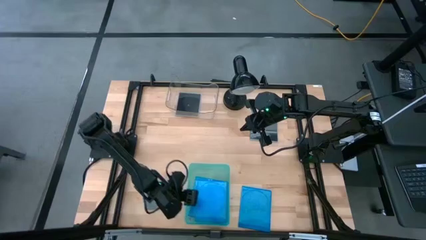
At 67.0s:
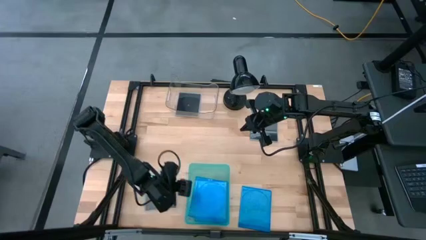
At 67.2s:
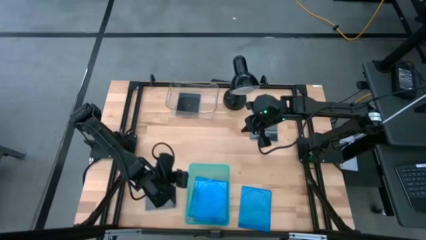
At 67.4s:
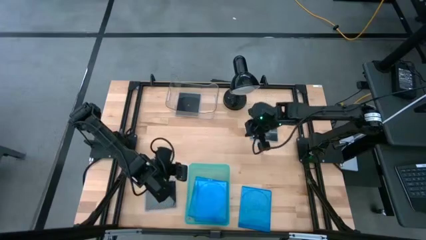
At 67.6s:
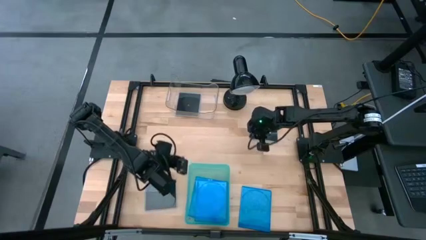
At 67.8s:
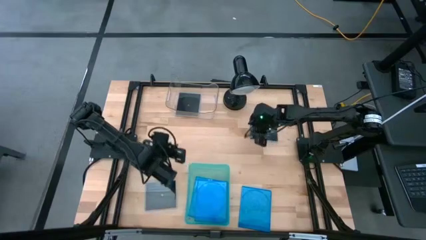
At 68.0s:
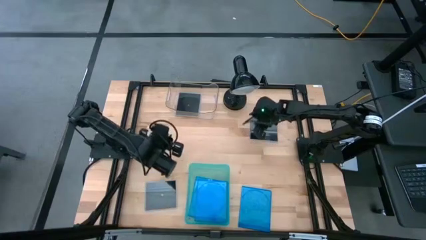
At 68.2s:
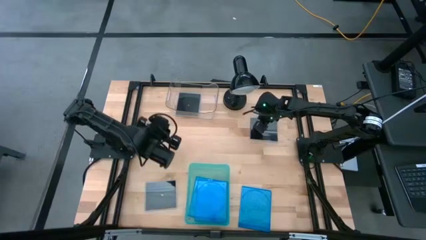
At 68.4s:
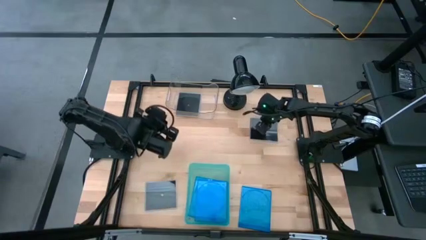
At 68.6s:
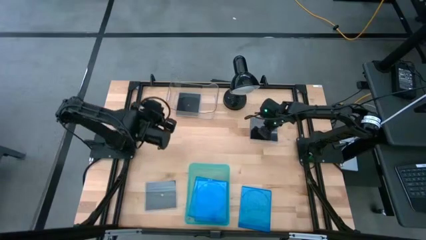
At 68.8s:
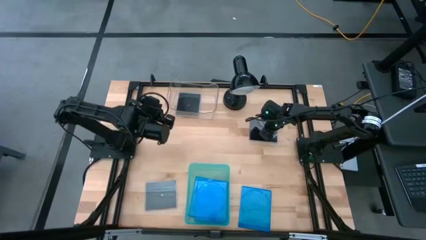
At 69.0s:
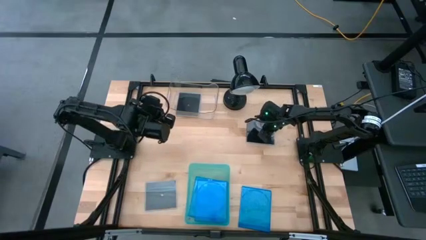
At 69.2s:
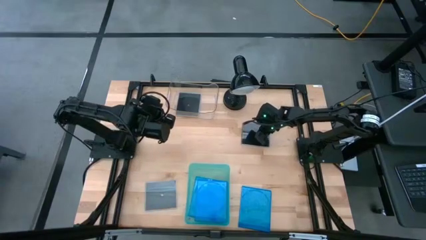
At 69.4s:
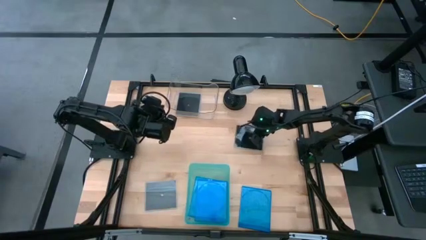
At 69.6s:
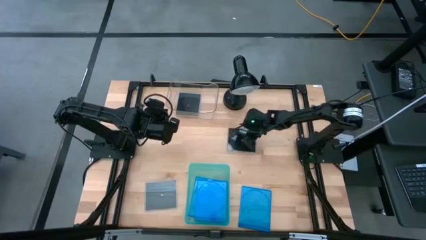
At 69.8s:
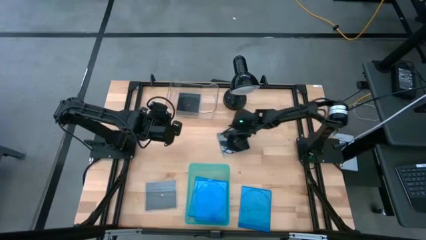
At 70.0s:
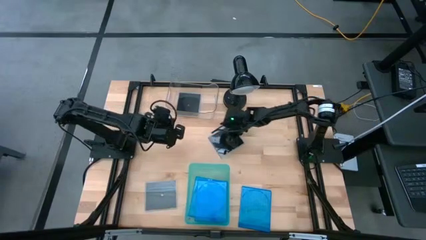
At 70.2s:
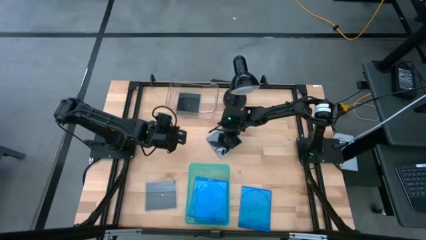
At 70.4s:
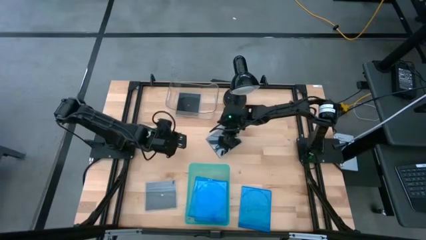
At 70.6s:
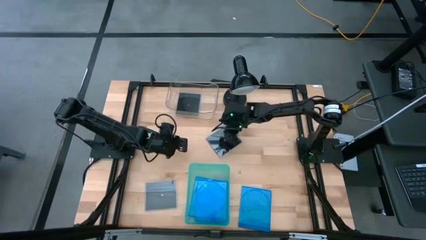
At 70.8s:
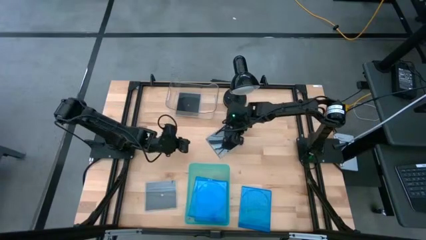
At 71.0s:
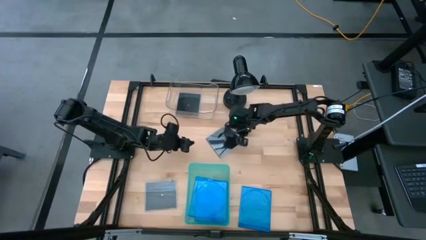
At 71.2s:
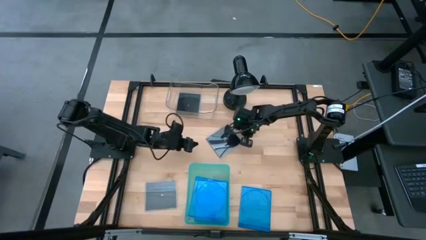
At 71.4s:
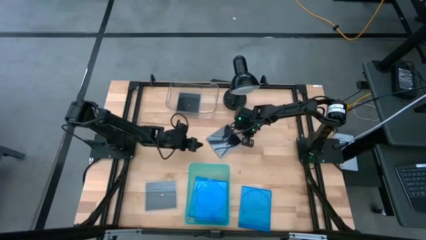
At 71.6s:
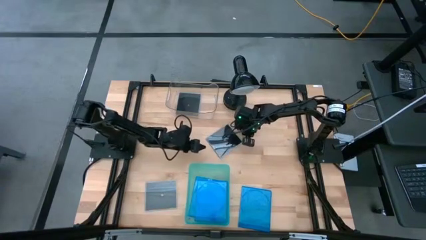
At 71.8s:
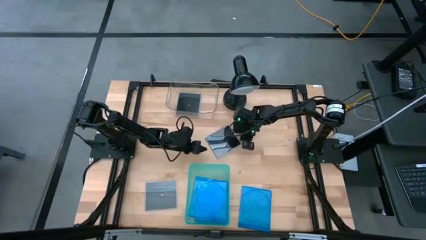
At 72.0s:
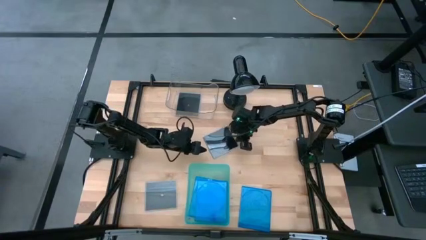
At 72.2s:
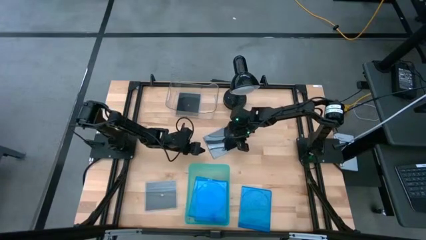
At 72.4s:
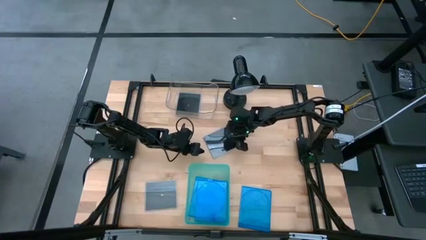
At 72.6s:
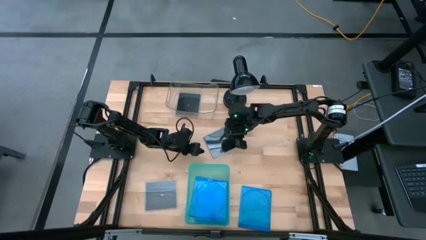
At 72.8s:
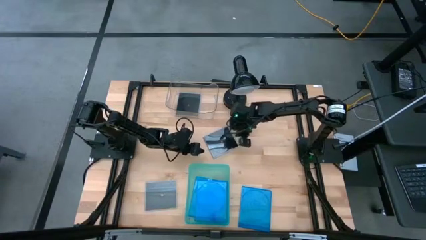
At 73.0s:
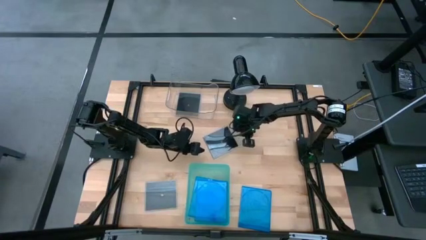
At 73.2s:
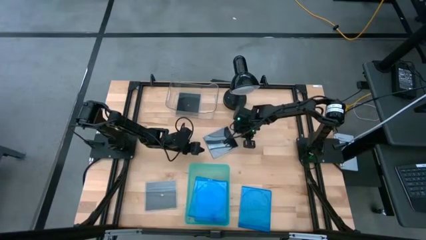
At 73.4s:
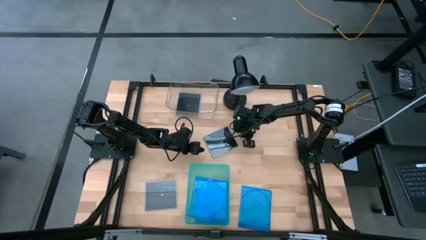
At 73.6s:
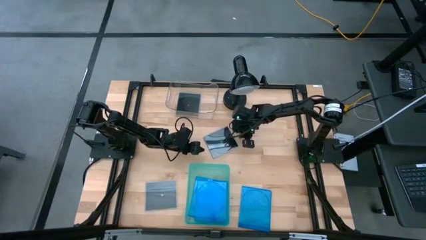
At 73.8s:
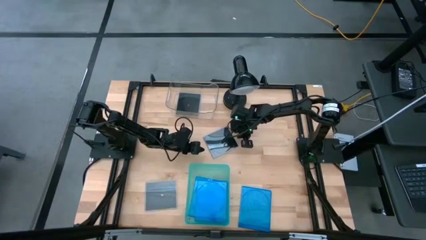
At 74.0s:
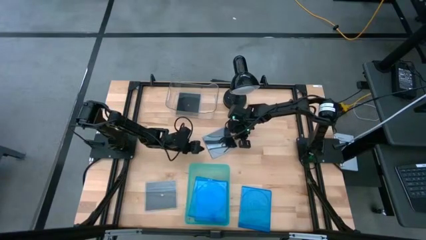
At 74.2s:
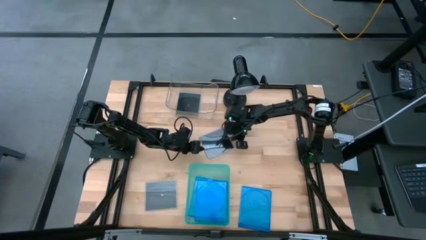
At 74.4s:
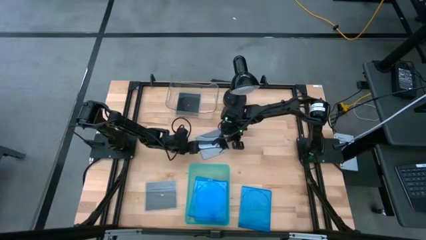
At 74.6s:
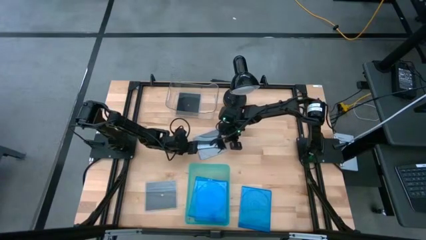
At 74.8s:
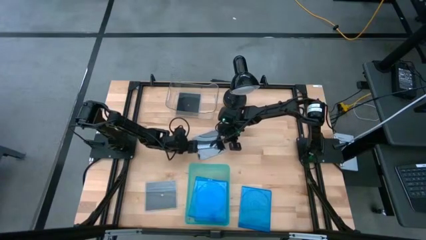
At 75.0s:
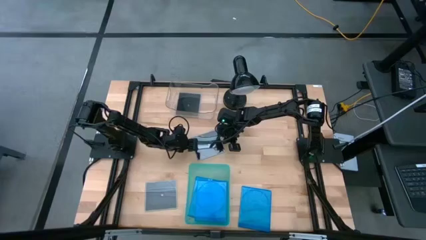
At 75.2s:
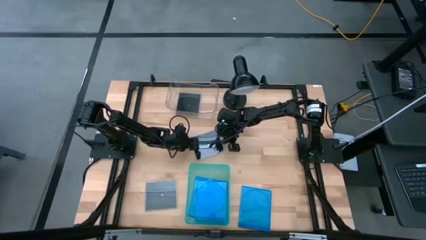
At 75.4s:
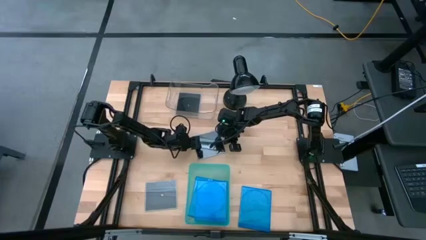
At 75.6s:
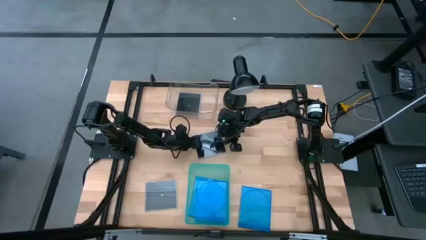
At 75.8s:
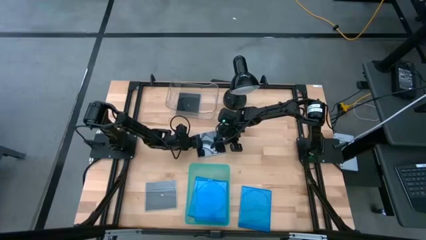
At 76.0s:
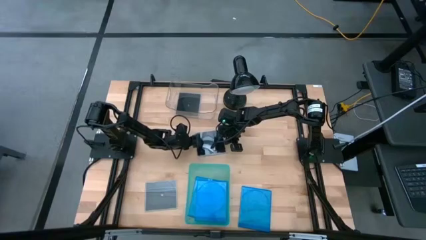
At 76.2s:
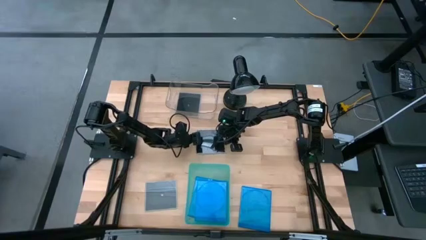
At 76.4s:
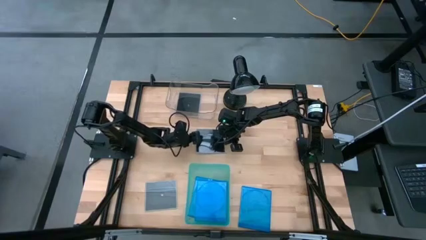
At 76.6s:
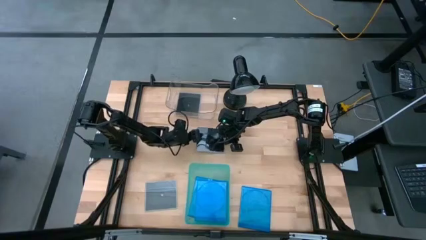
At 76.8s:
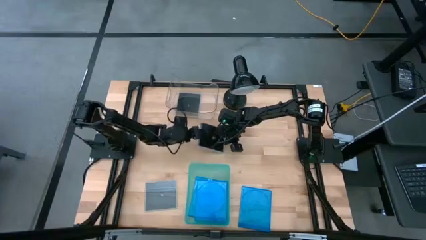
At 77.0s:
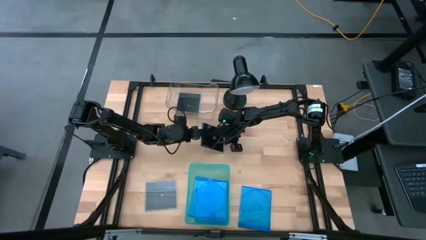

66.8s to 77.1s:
Task: Pick & place jewel cases by type
Put the top black CD case into the transparent bin

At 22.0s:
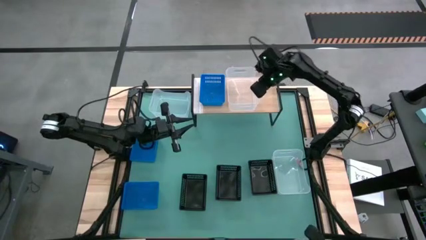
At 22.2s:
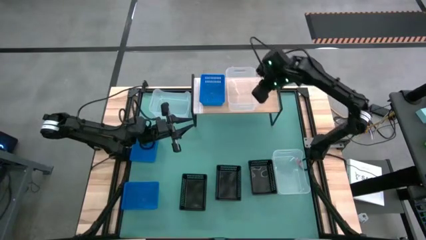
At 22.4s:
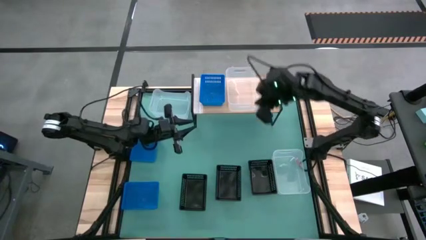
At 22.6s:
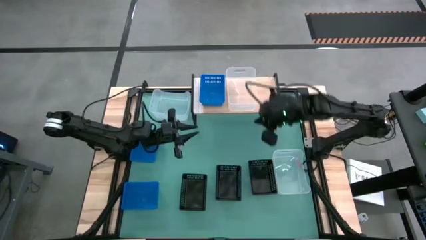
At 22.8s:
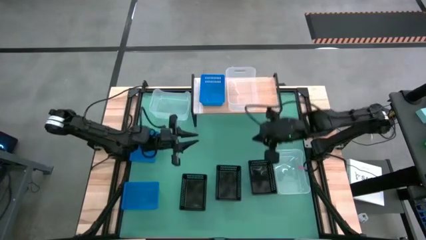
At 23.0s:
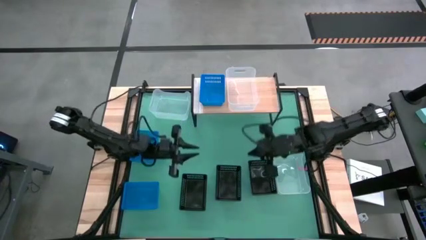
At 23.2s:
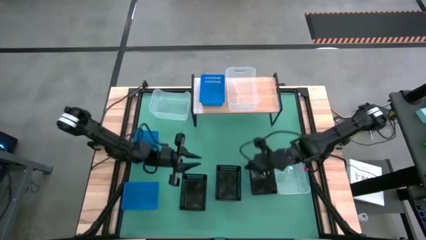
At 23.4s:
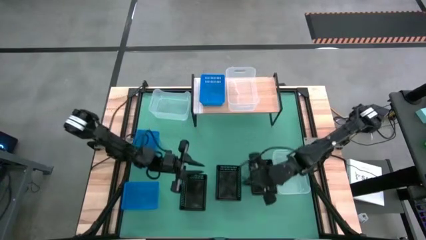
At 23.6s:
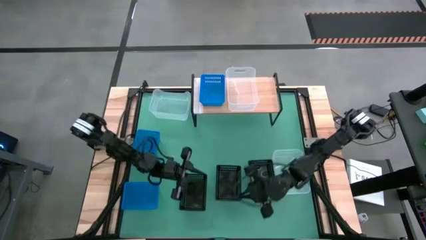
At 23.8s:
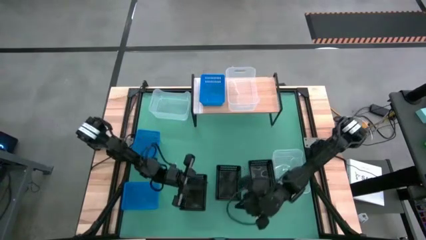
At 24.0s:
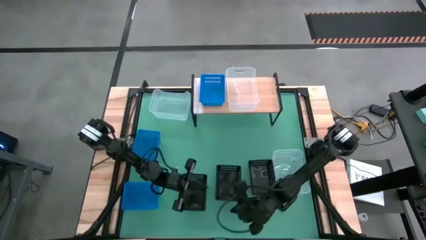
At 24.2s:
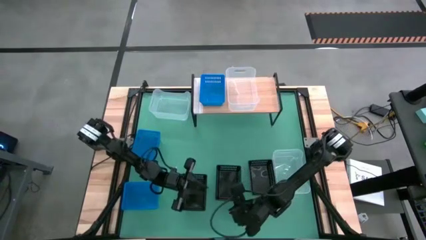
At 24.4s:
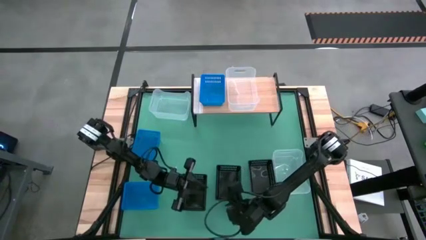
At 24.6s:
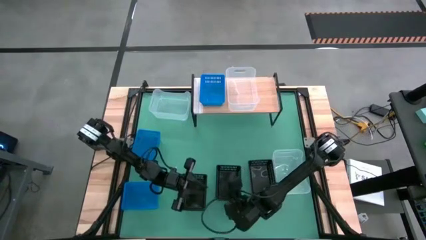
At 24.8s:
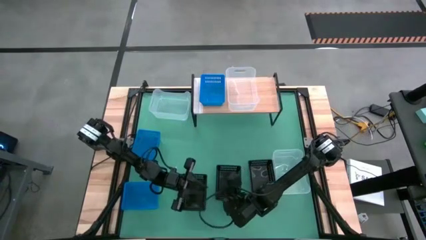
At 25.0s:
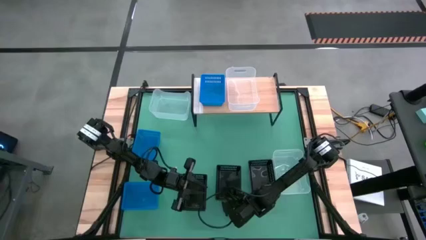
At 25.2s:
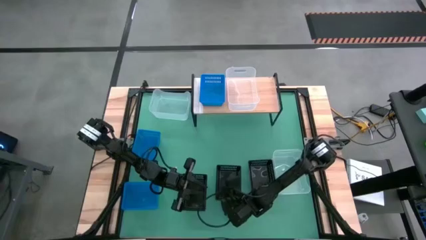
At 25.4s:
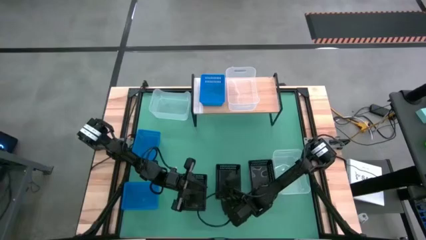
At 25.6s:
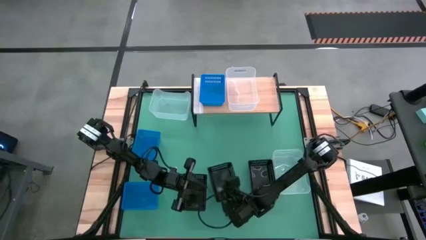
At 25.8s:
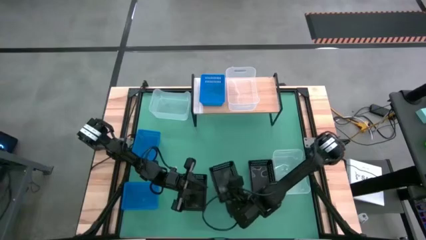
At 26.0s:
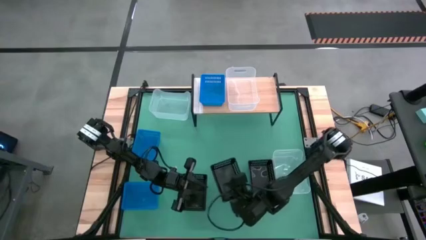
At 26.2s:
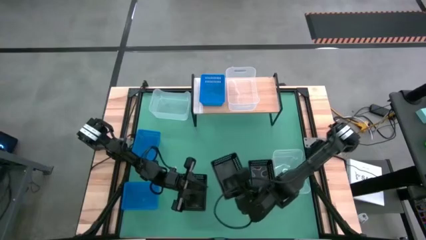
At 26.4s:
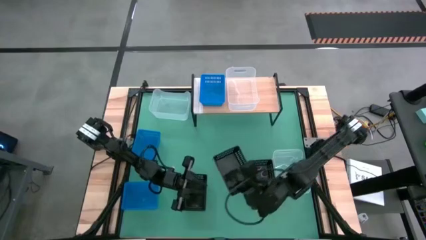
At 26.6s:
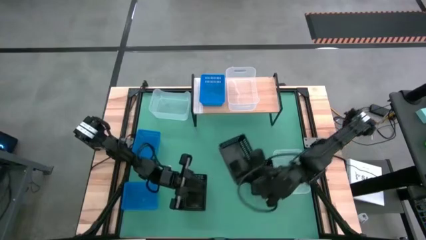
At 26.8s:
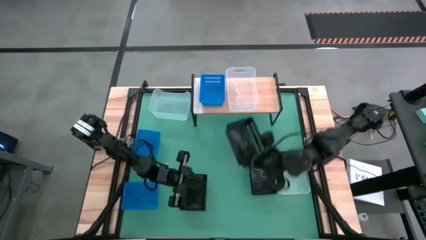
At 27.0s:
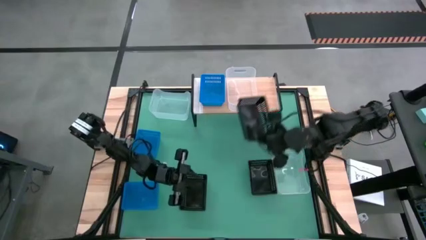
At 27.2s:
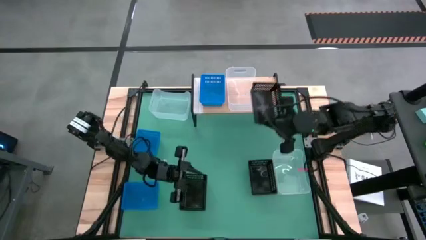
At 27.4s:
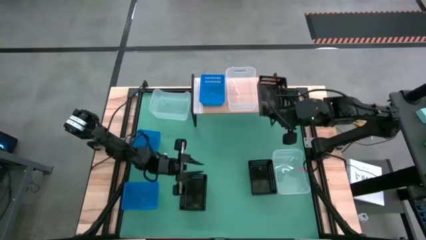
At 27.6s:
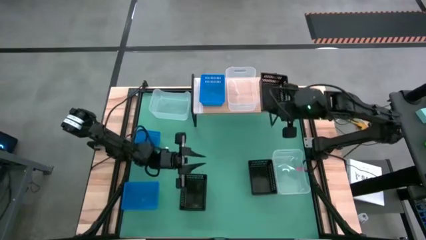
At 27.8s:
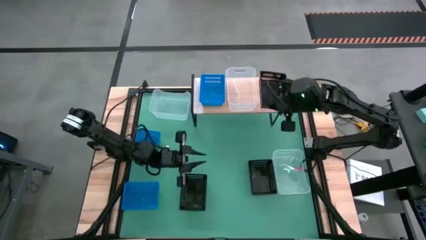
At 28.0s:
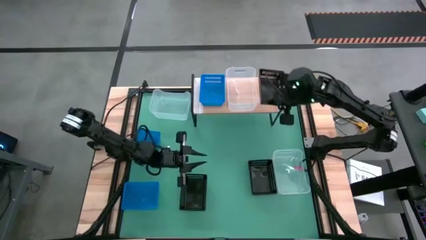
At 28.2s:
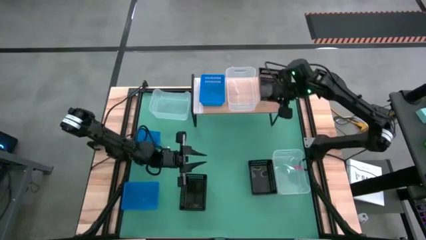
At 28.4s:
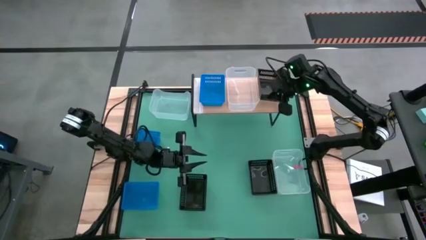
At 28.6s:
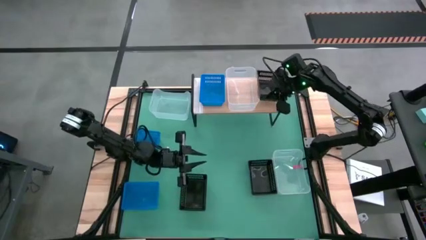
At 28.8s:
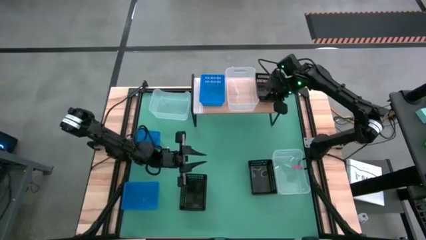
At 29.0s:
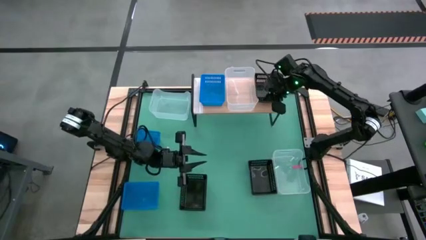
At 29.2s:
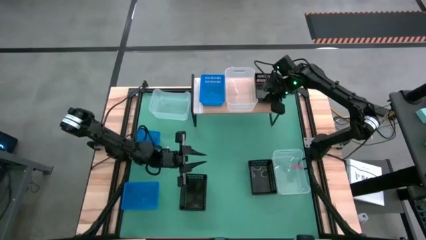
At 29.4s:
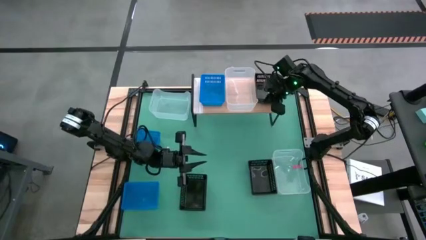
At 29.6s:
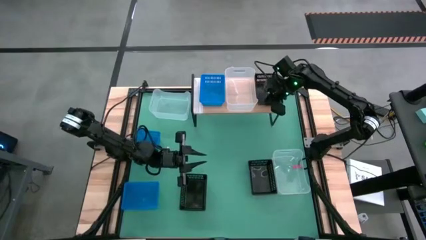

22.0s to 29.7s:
Task: Stack baskets on shelf by color
Put the center black bin on the shelf
